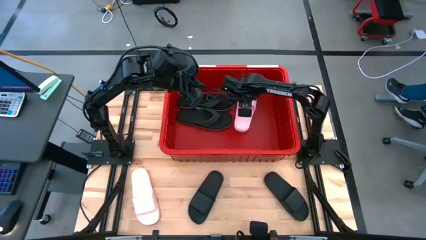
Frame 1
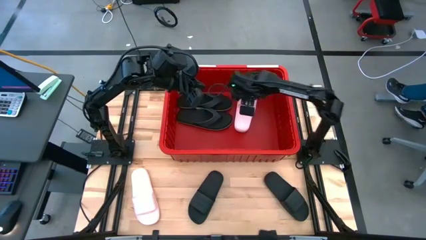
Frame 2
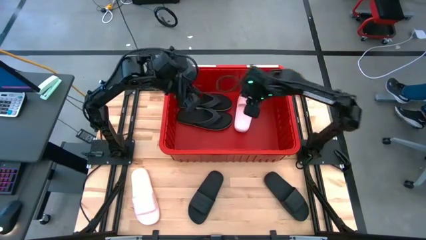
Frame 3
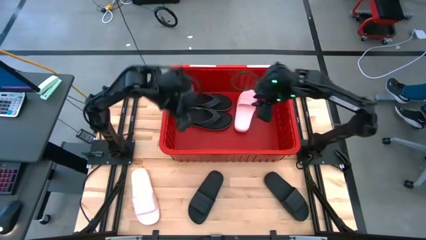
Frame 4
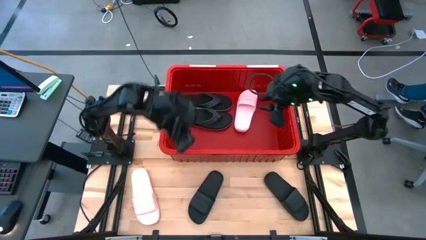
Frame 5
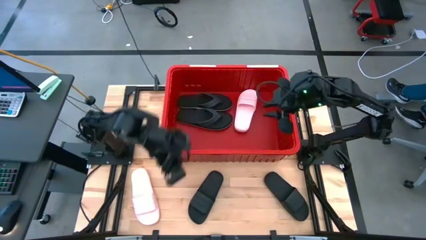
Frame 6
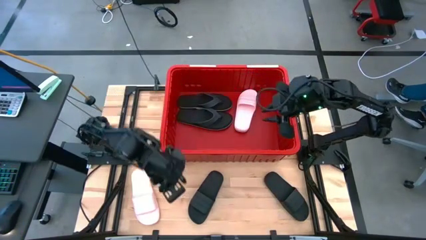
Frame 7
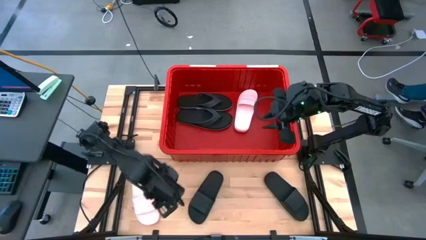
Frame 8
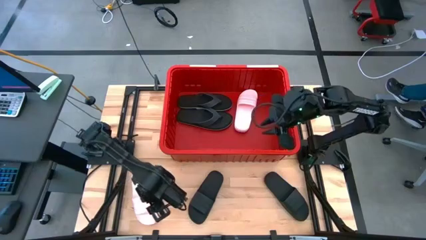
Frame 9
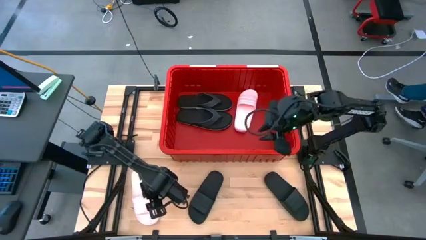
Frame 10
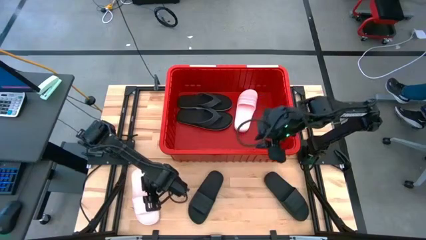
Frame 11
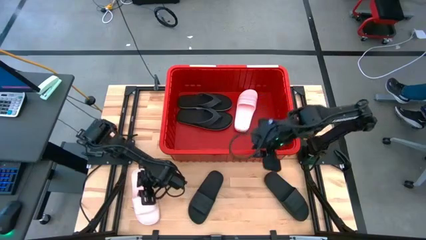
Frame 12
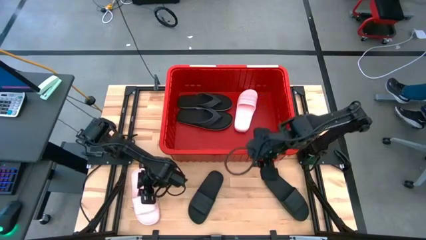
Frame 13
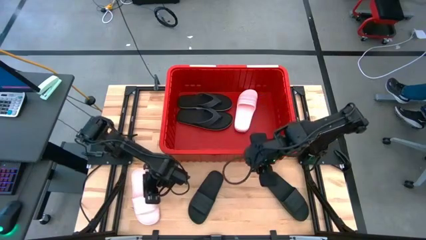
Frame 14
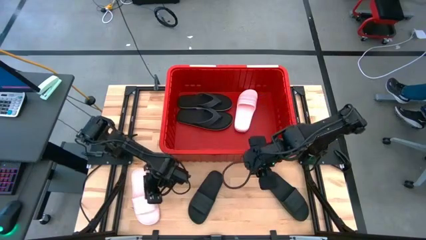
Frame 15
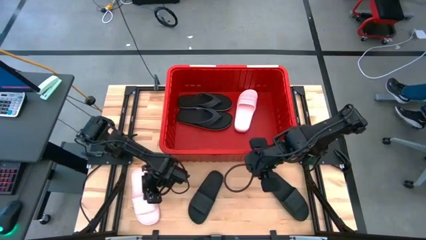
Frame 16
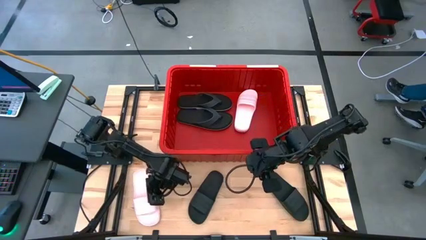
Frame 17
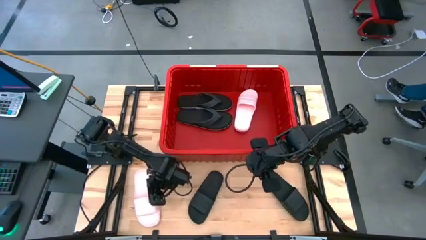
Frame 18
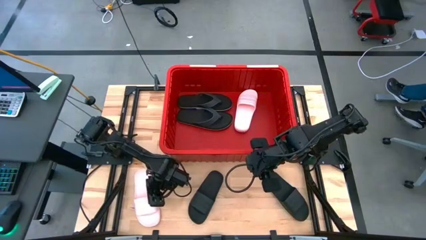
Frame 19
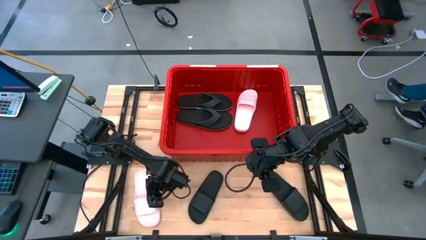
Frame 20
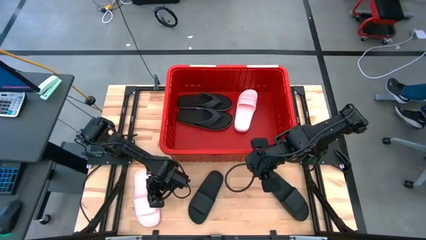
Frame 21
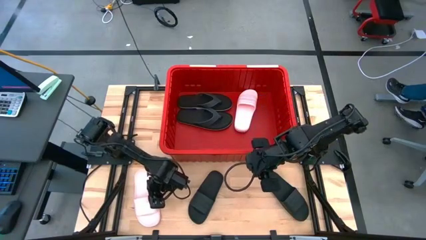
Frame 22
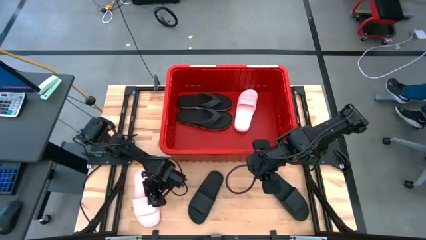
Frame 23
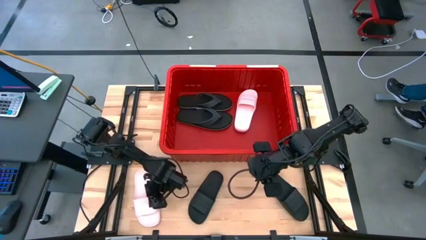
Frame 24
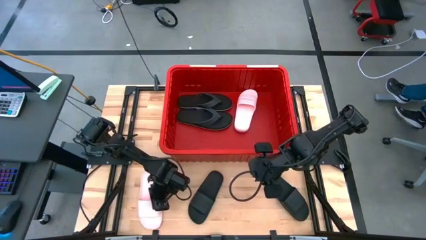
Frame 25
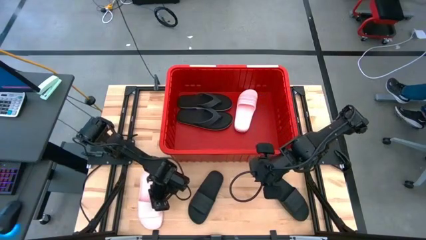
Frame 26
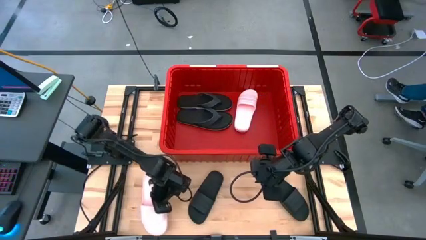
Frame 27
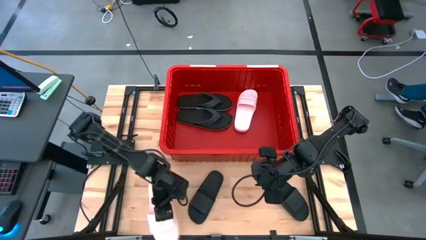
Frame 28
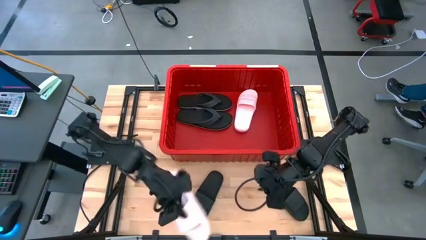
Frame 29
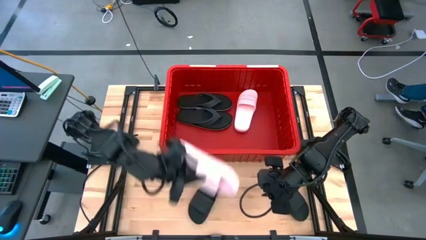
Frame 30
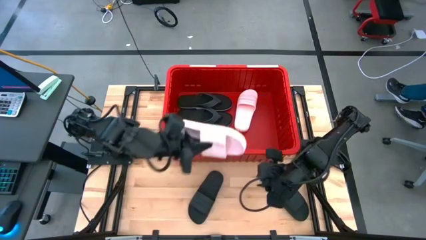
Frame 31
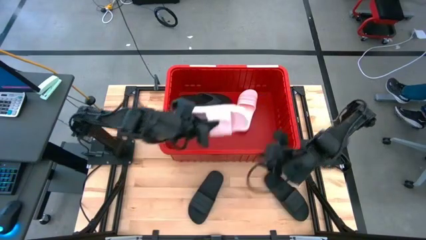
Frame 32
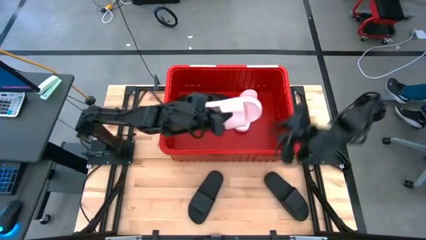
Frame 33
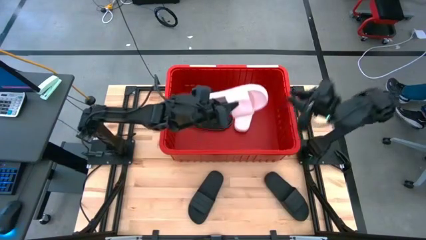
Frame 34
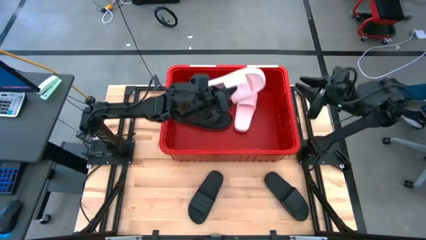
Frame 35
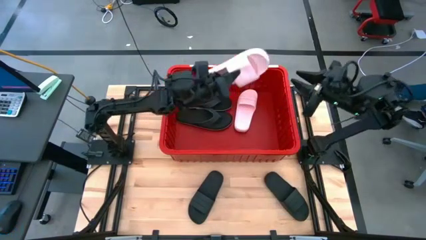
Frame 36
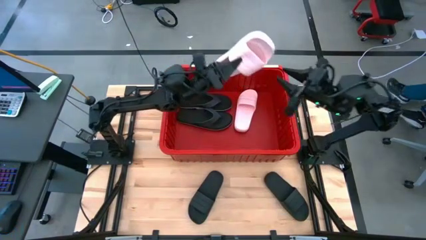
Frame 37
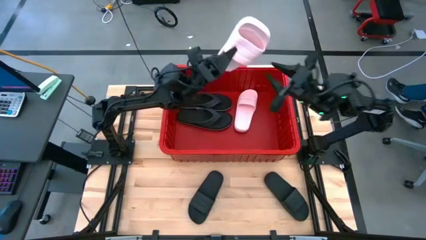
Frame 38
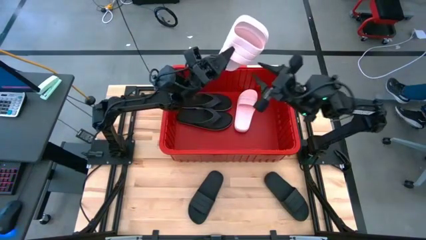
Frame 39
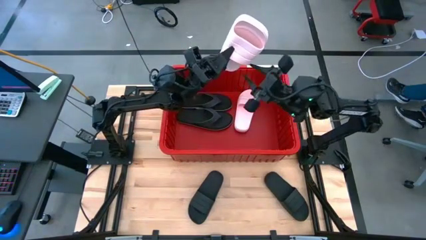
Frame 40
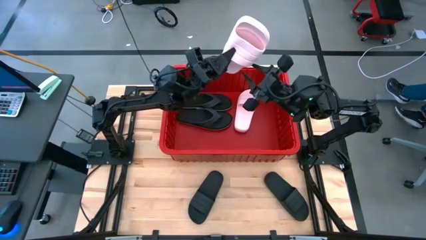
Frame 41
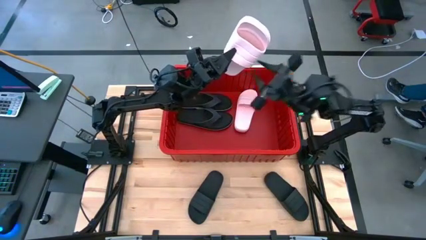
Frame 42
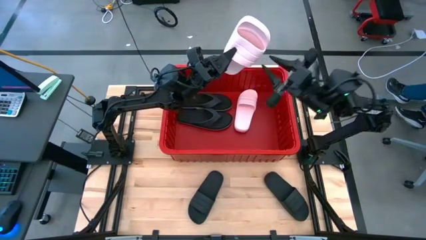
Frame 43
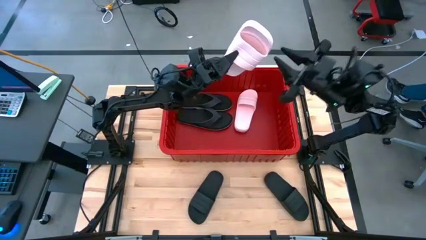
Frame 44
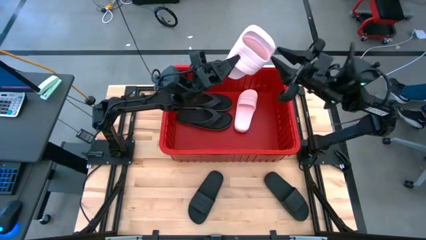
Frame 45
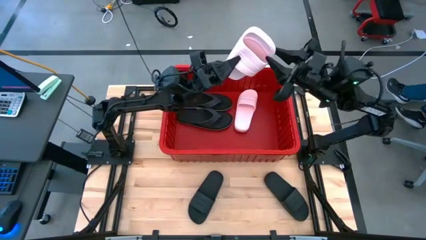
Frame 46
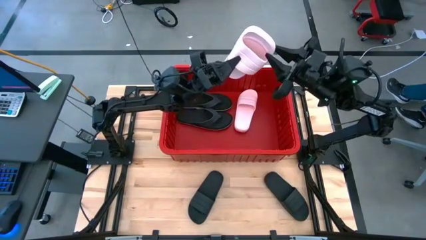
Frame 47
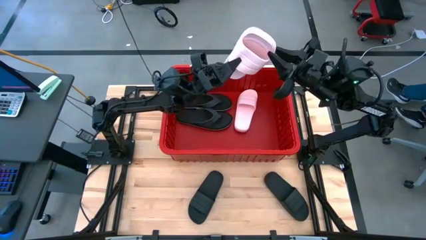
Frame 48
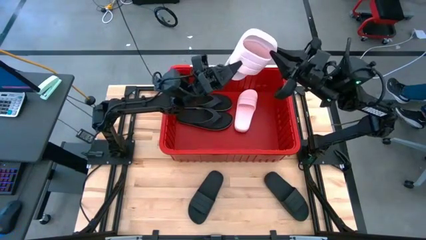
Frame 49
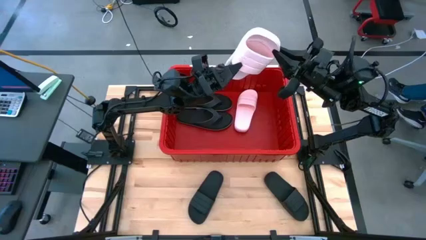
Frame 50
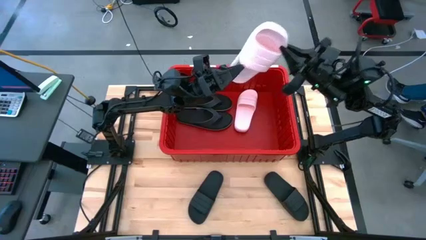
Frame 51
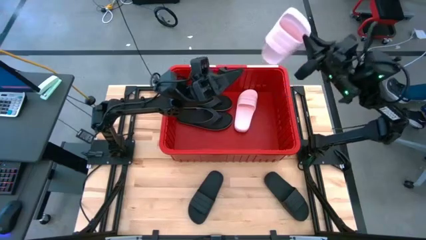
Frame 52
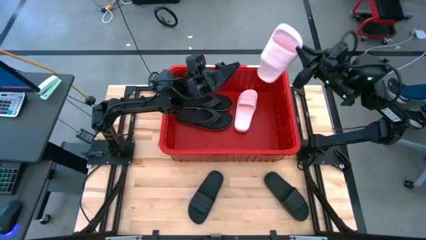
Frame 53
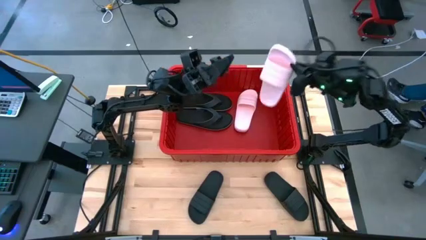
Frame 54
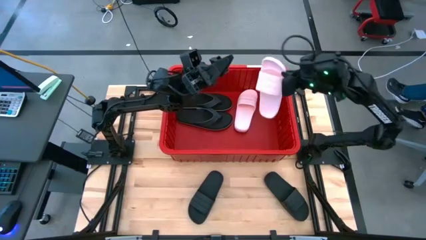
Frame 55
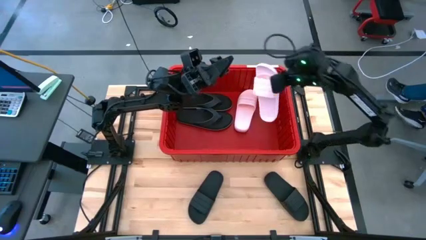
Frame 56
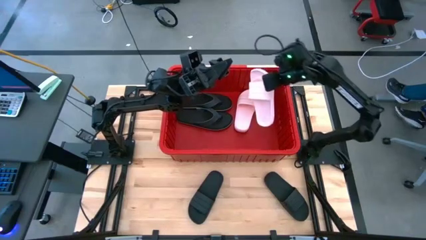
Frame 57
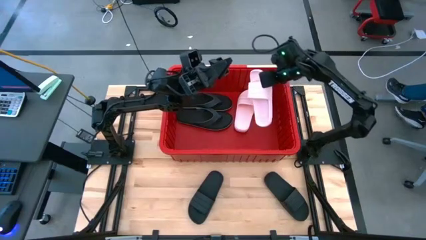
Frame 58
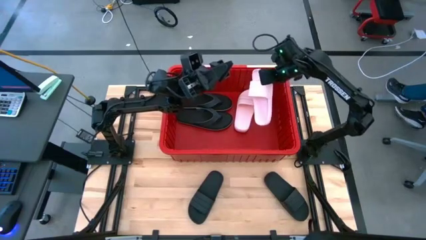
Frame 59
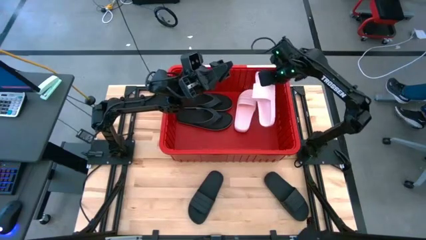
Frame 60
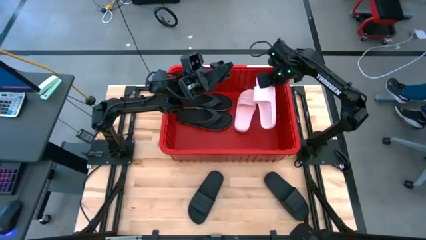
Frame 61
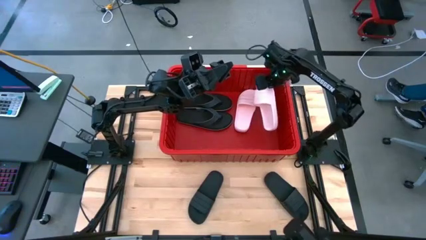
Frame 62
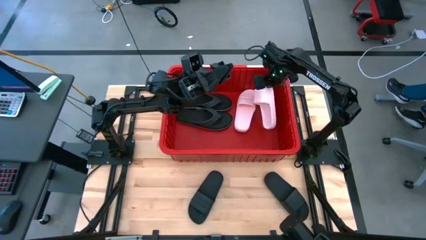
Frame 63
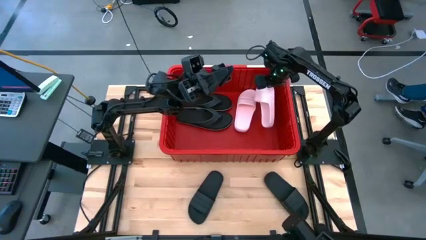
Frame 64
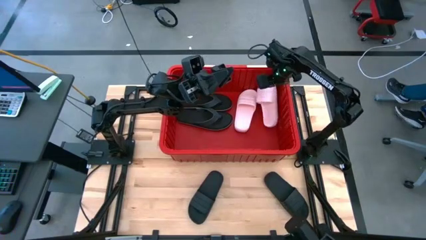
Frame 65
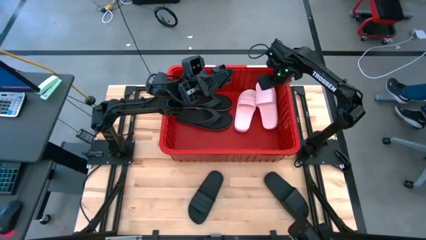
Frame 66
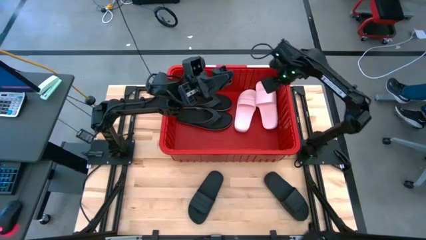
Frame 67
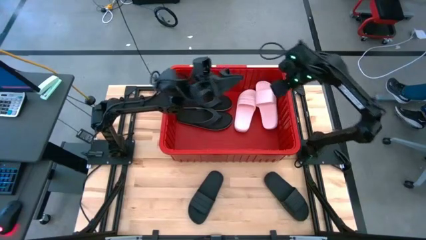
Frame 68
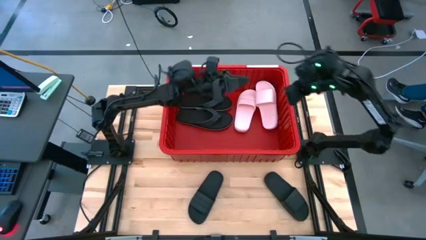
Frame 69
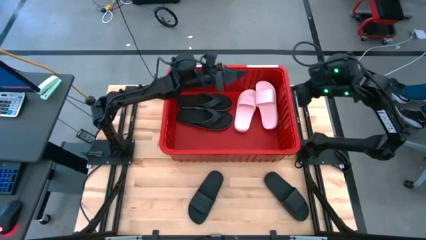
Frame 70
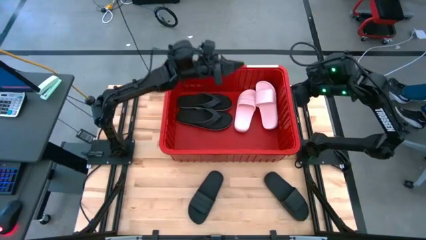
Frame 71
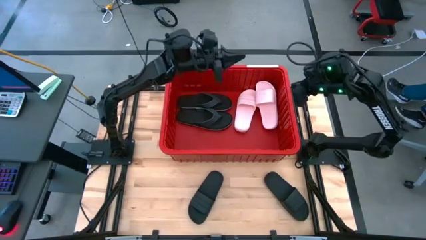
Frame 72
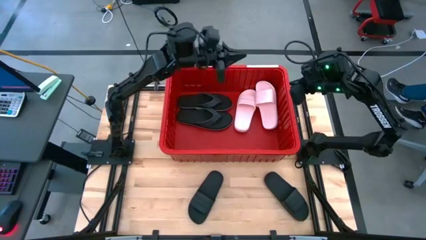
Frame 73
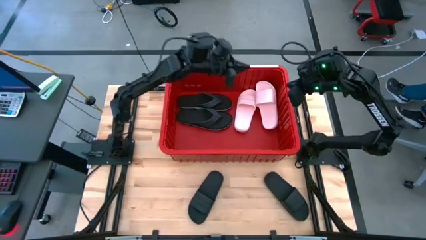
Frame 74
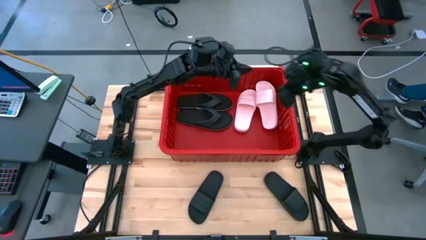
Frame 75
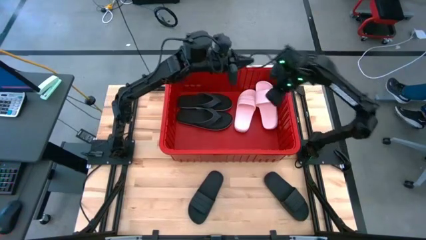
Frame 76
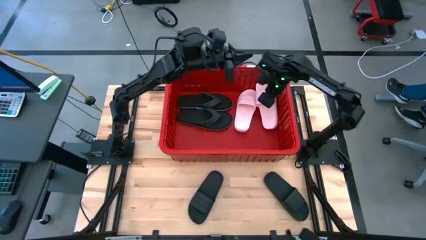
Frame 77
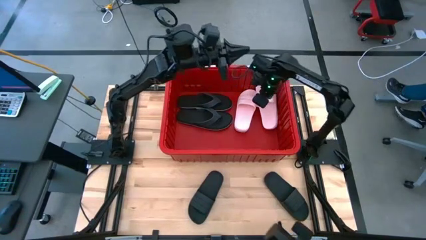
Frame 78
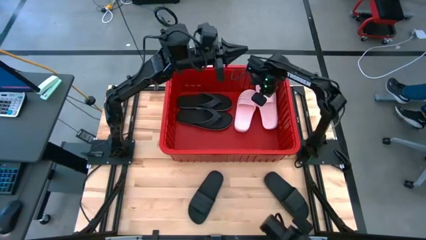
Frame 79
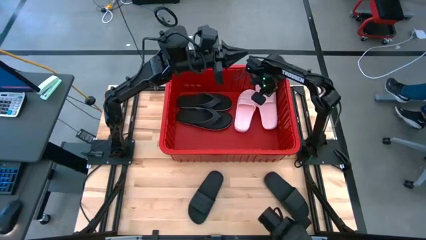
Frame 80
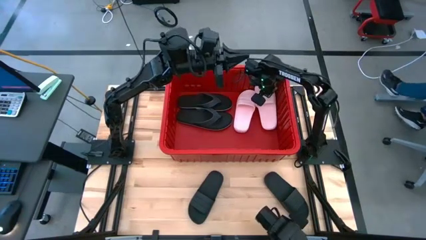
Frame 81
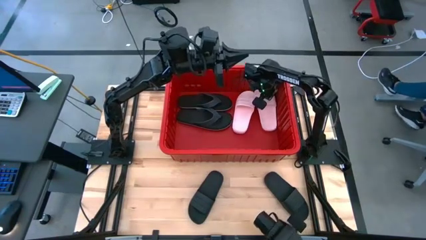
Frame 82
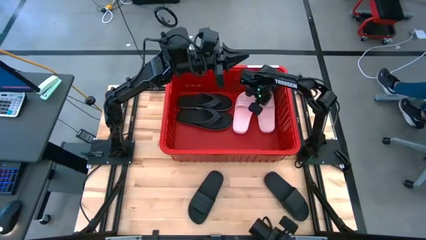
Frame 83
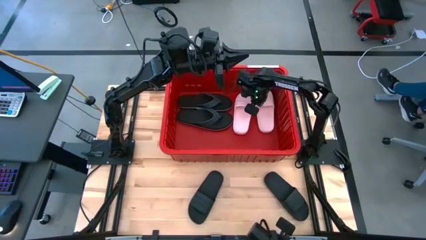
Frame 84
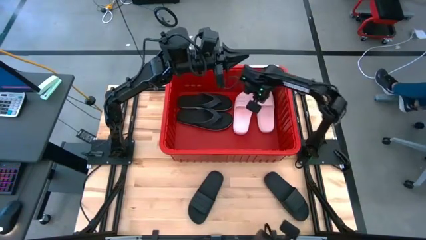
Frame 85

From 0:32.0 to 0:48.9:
Task: Pick and place slides into bin
Put the other pink pair slides into the bin
